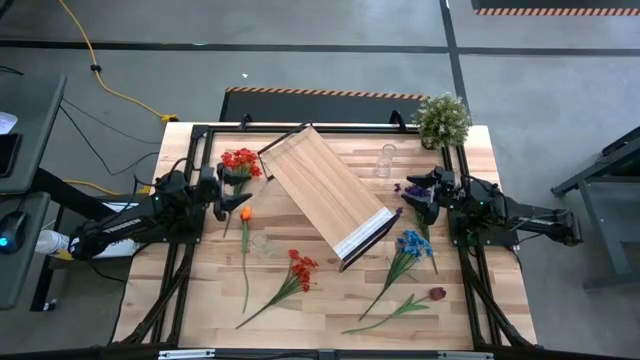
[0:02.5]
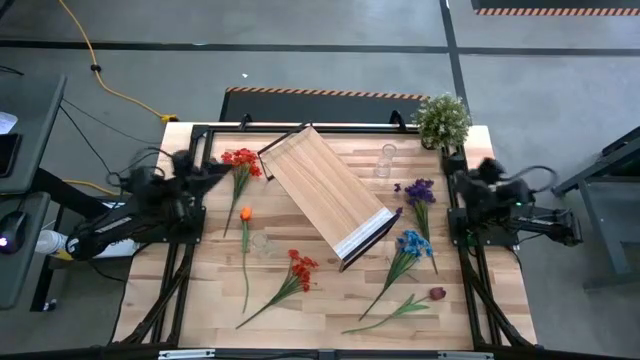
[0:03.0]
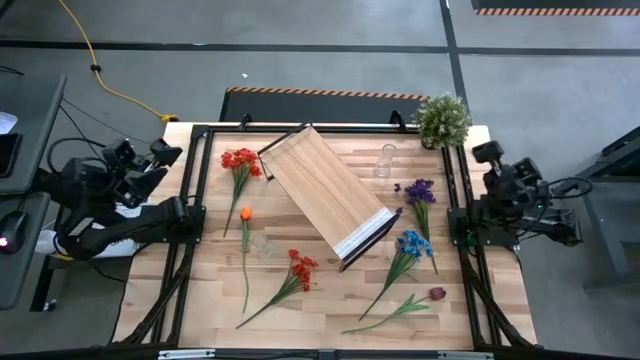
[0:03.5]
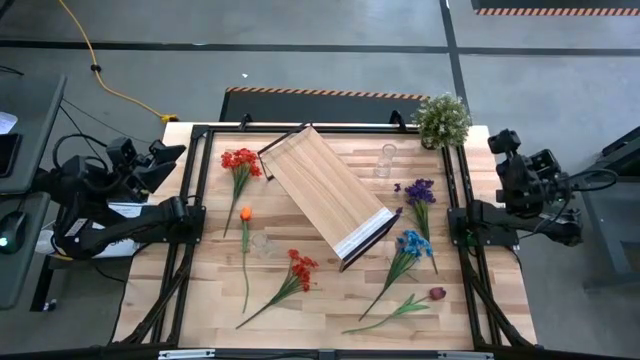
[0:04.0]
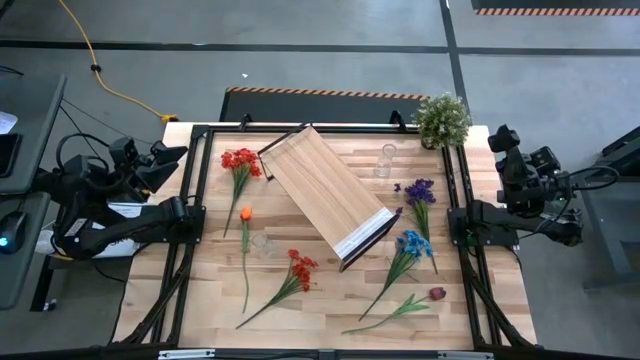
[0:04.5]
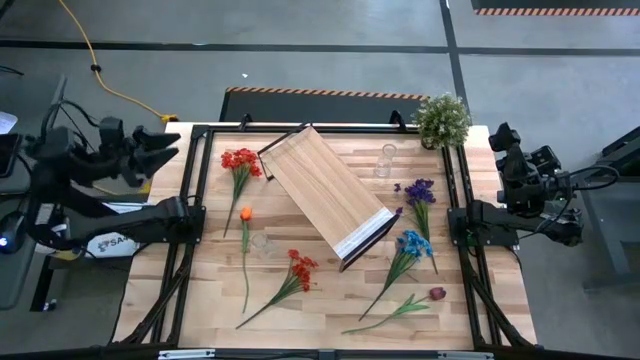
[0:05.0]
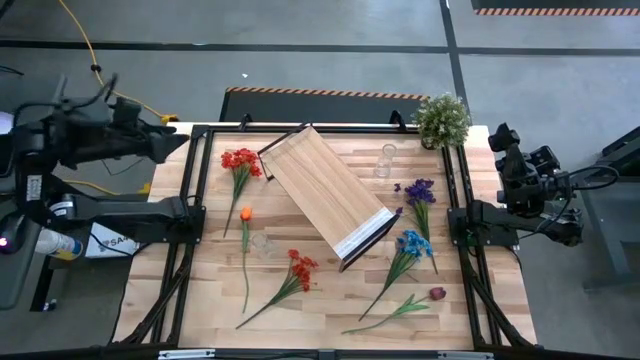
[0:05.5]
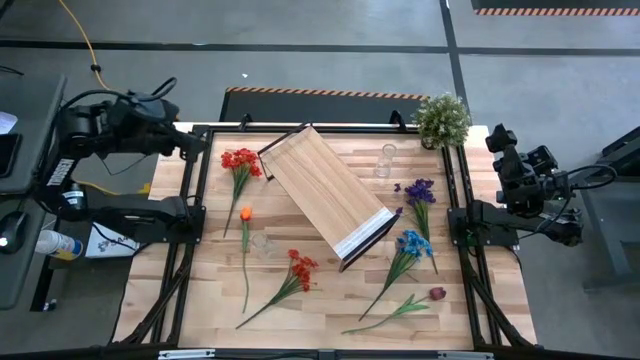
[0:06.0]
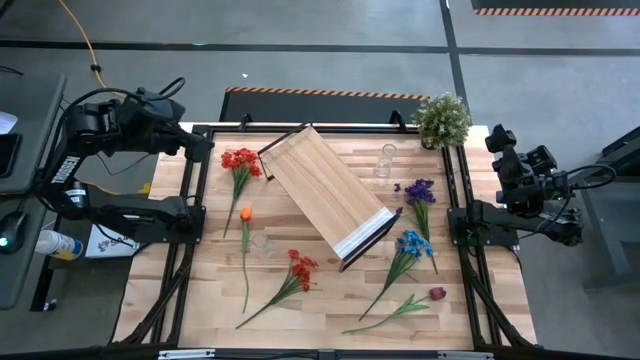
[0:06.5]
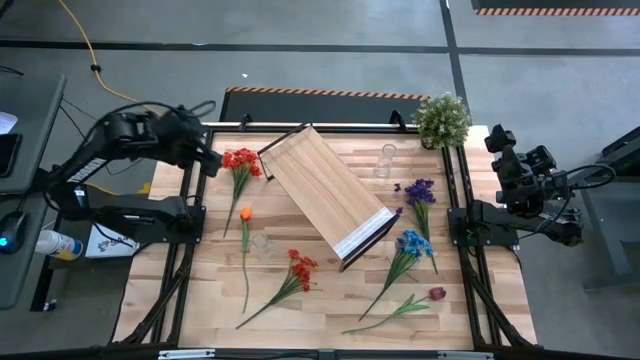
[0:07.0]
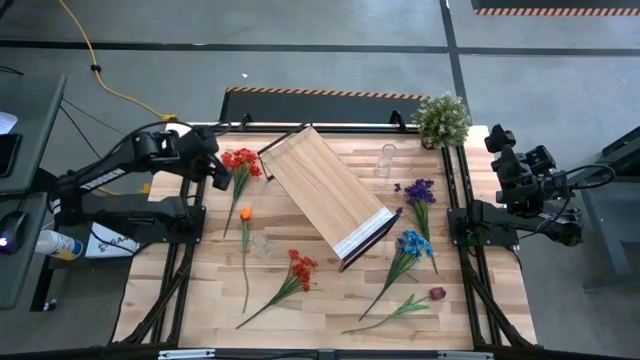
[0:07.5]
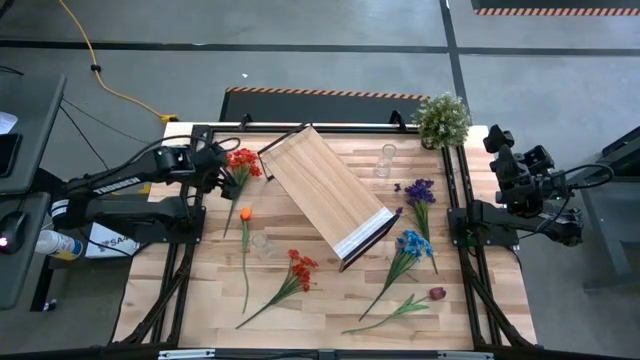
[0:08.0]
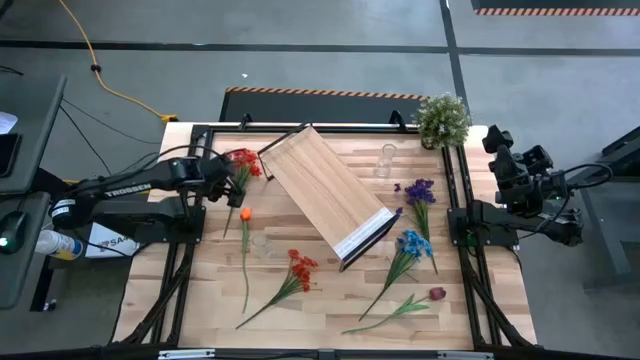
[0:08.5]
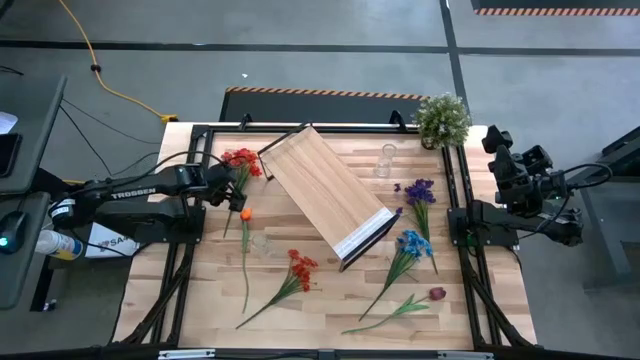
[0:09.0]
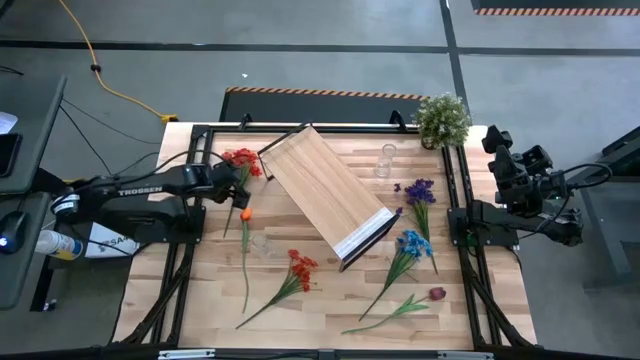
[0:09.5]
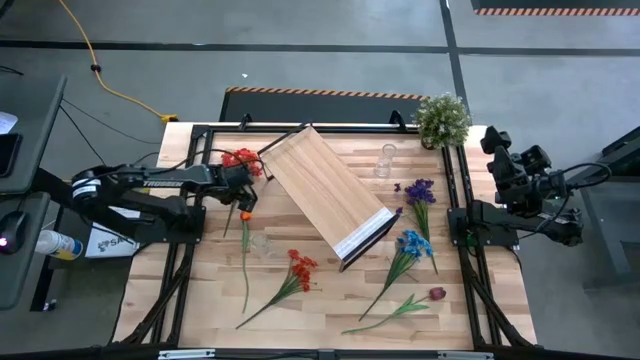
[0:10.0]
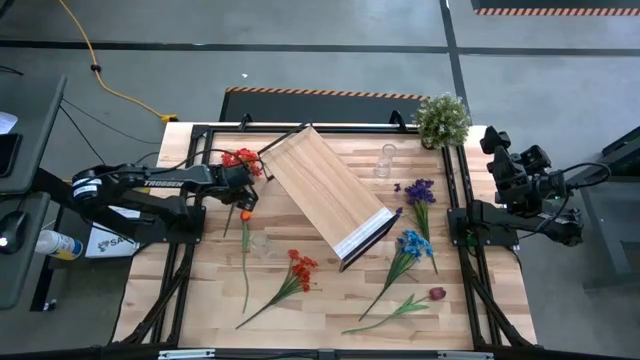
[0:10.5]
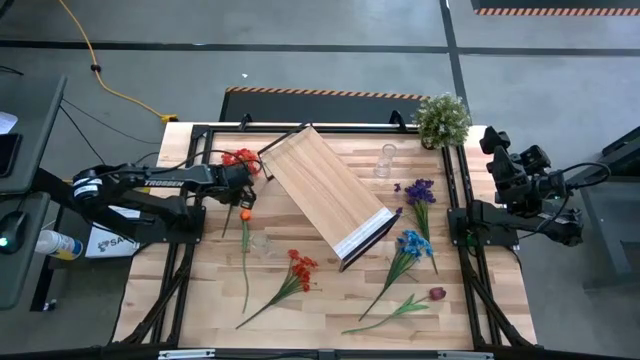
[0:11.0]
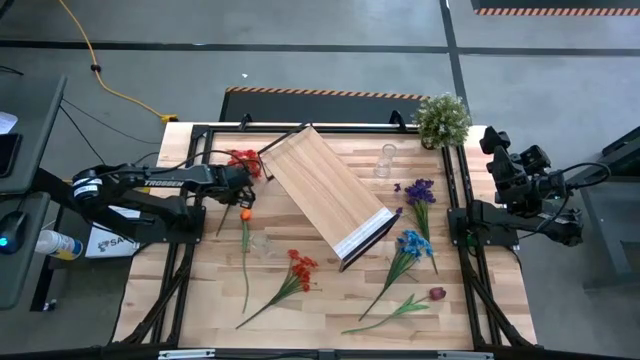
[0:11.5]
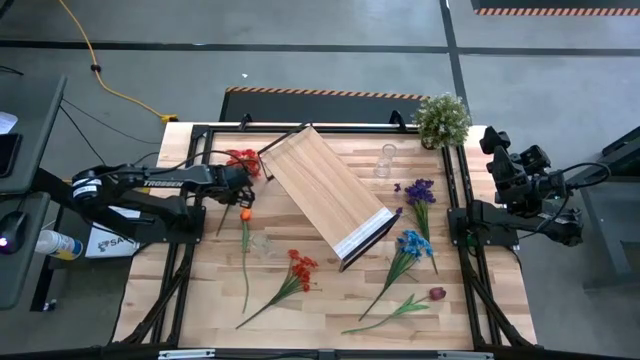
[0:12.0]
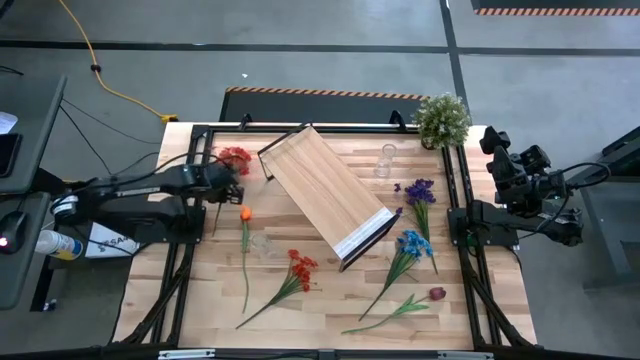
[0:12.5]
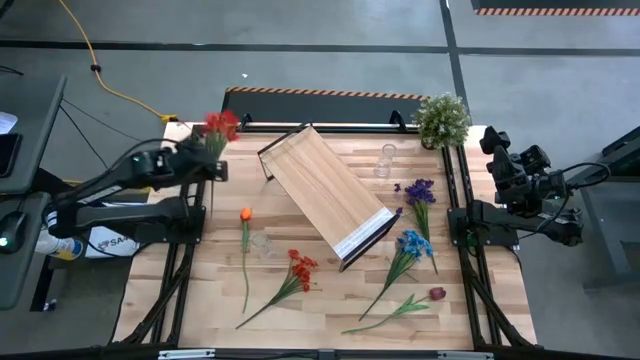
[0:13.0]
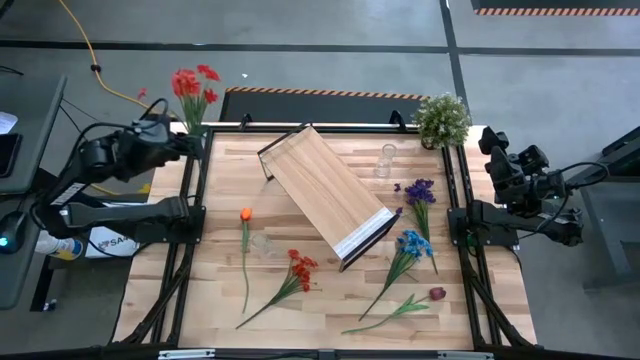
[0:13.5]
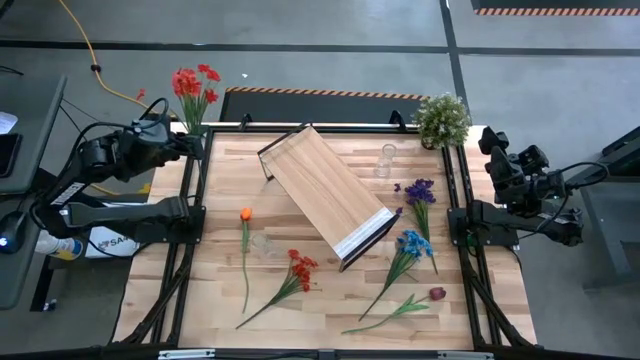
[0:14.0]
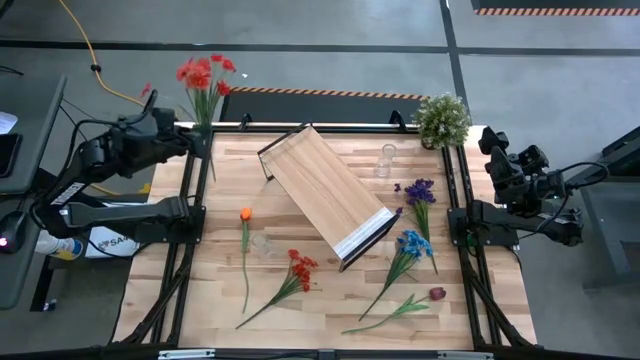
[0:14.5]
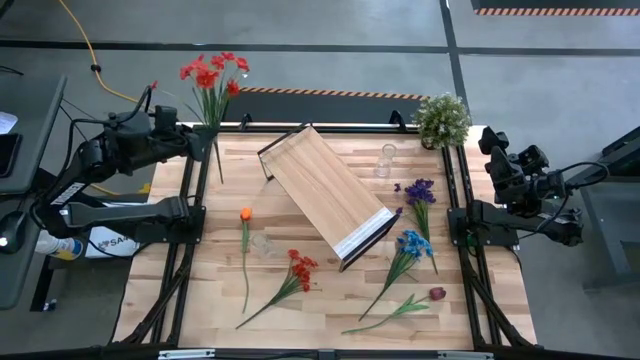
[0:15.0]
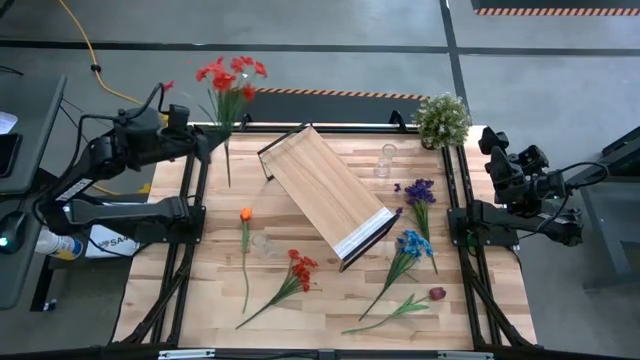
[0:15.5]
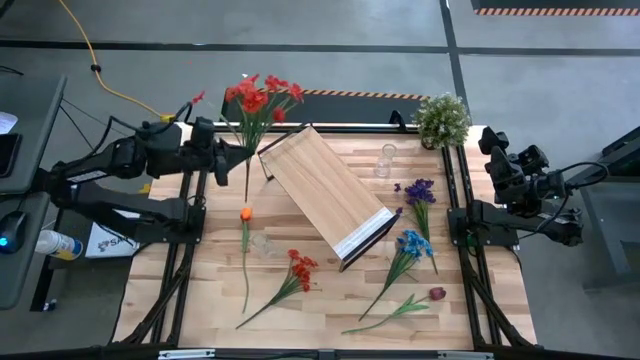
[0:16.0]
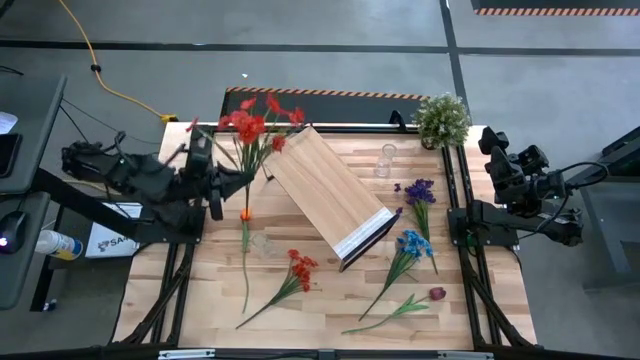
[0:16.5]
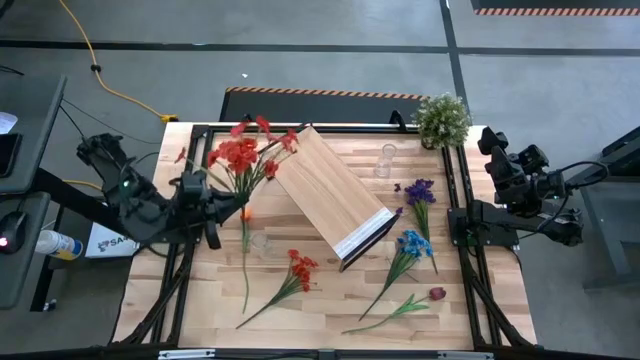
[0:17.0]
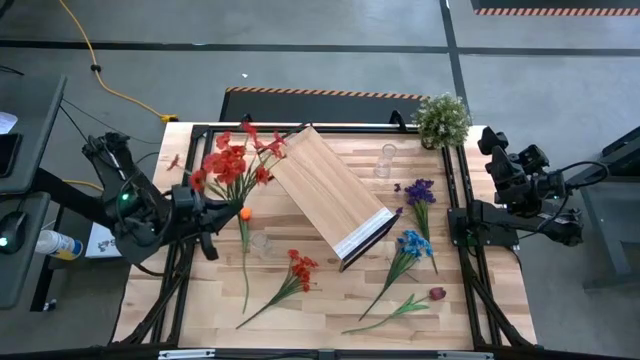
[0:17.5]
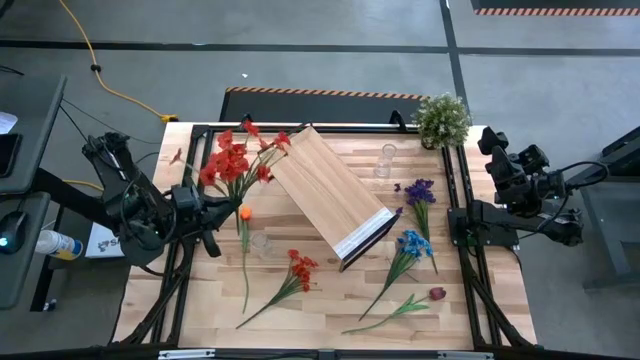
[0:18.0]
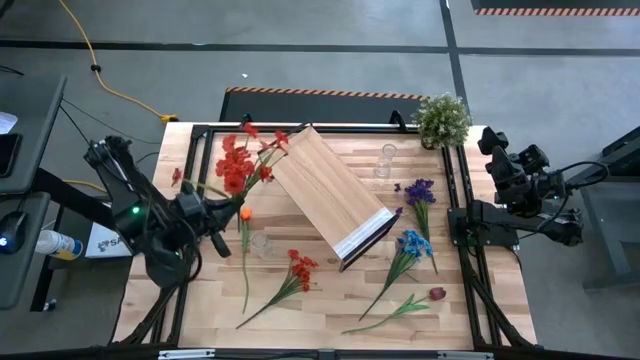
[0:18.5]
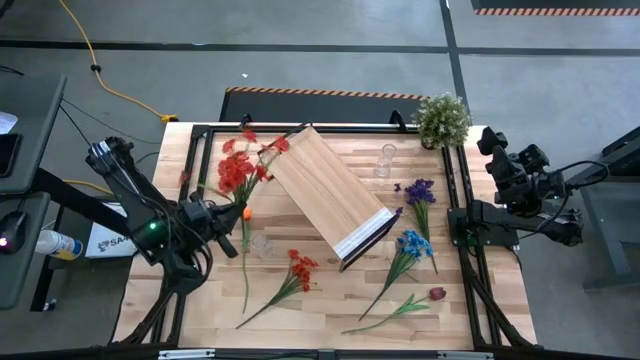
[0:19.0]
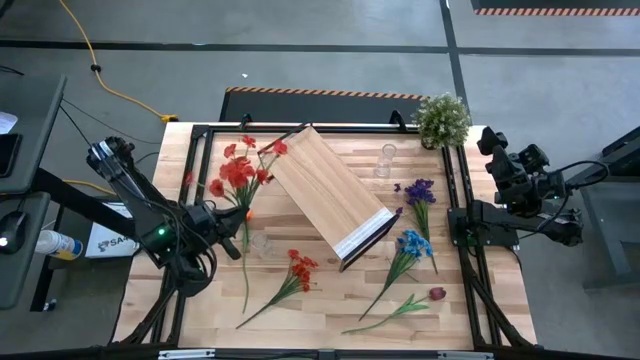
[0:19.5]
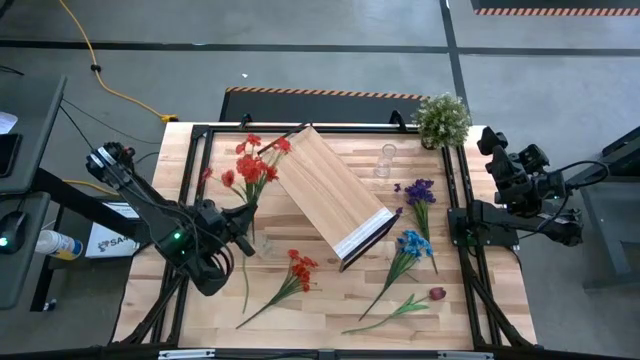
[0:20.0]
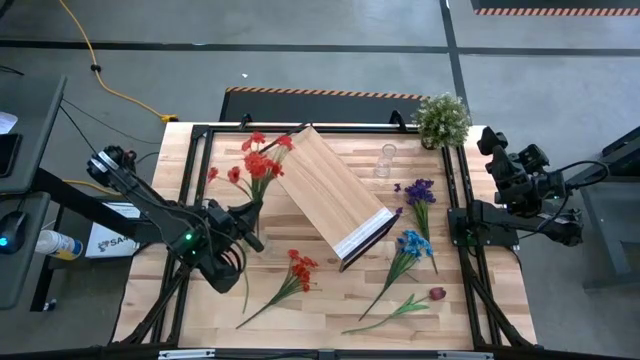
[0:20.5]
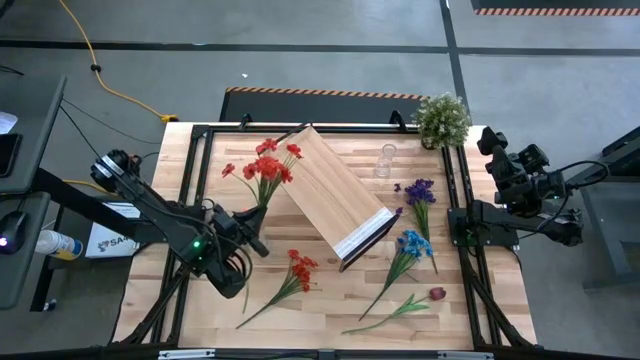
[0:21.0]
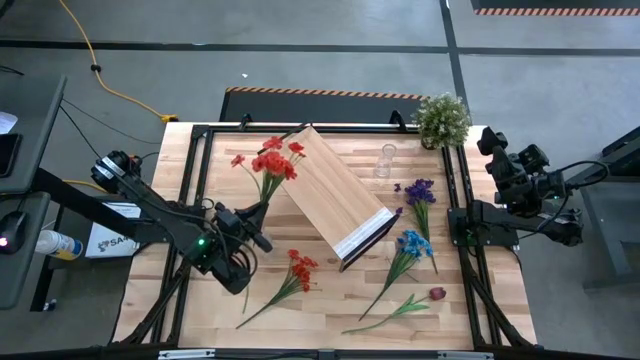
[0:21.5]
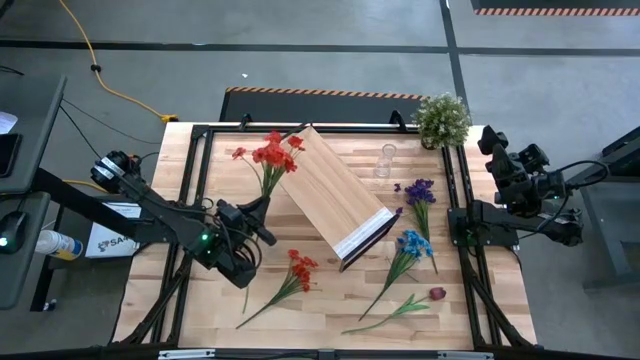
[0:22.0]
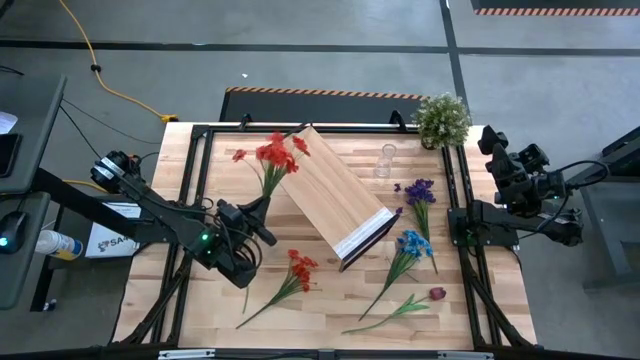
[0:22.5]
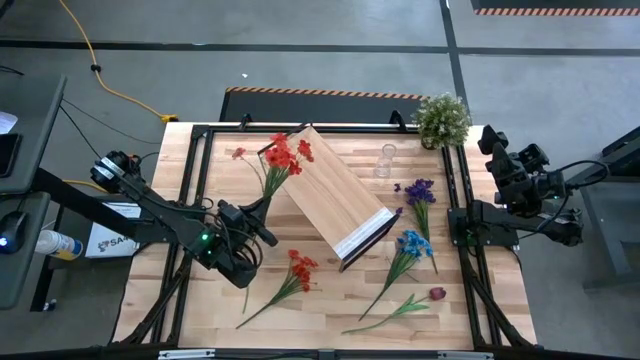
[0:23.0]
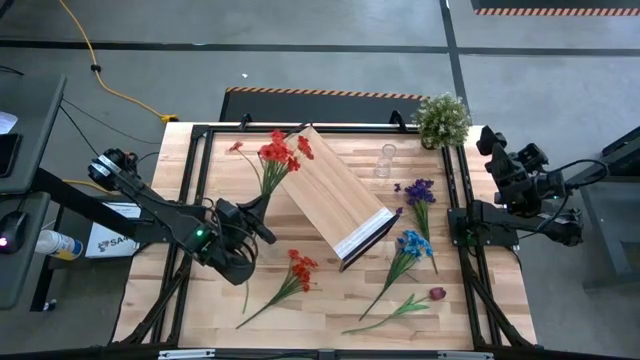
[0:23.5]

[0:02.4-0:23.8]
Task: Pick and place flowers into a vace then onto a shelf
Put the top red flowers into the bottom transparent vase
